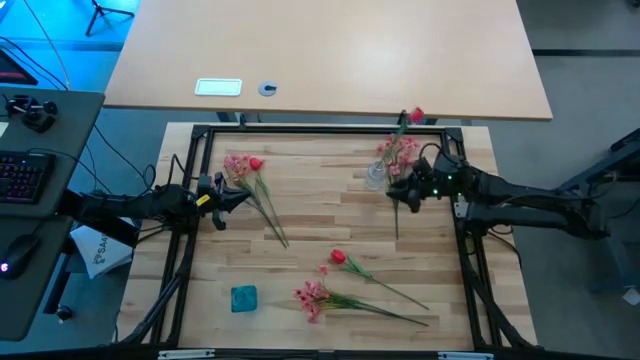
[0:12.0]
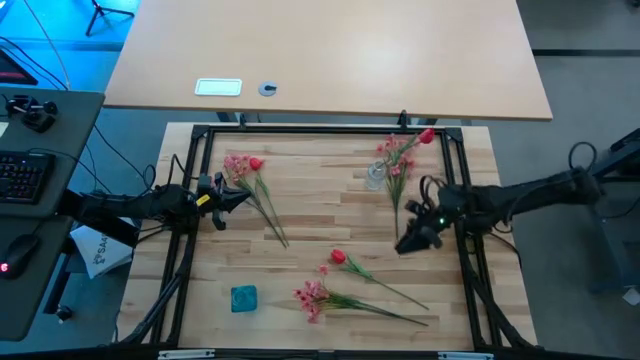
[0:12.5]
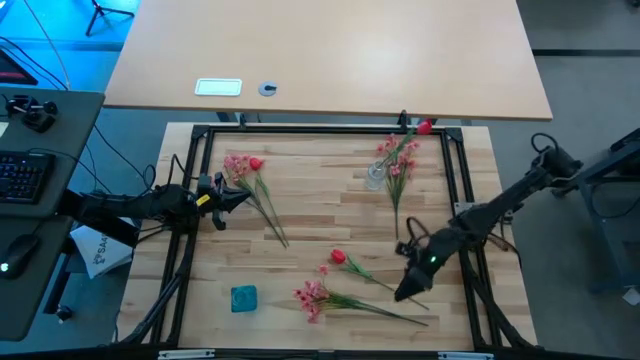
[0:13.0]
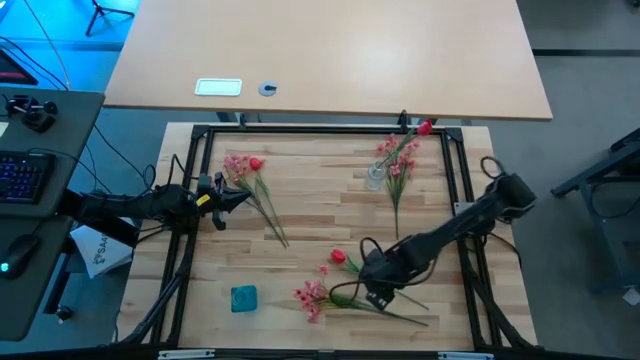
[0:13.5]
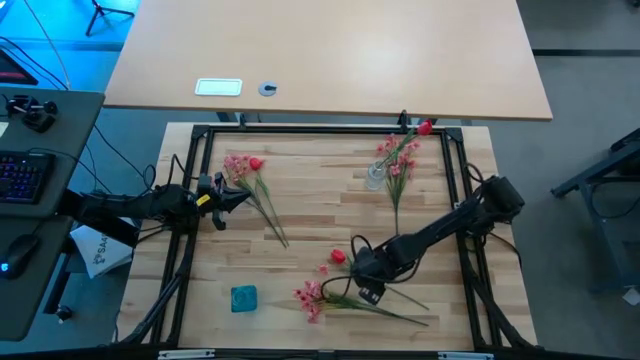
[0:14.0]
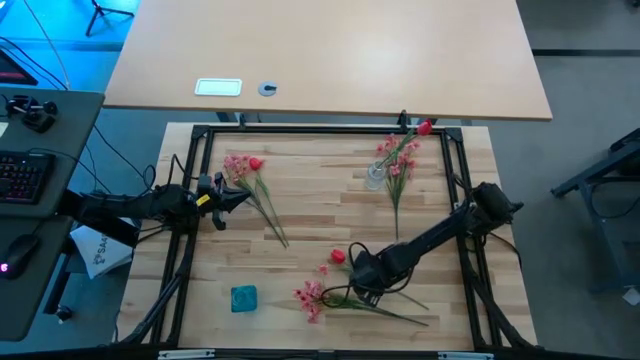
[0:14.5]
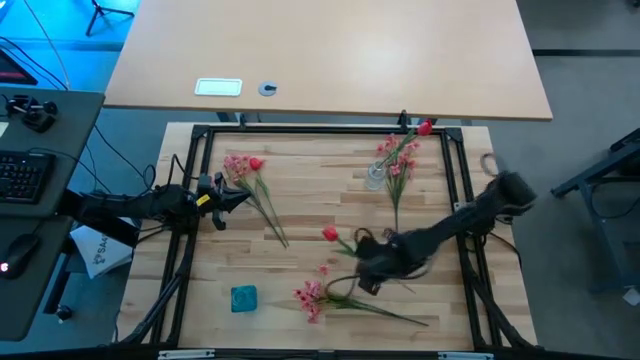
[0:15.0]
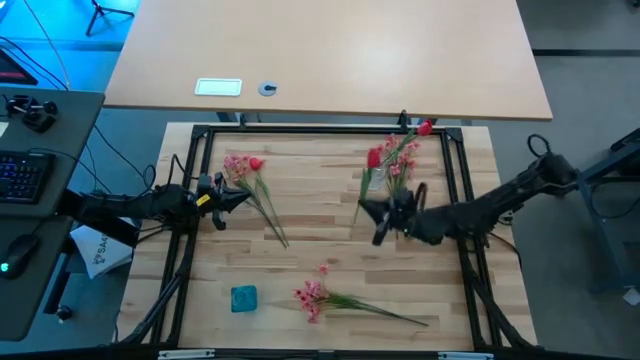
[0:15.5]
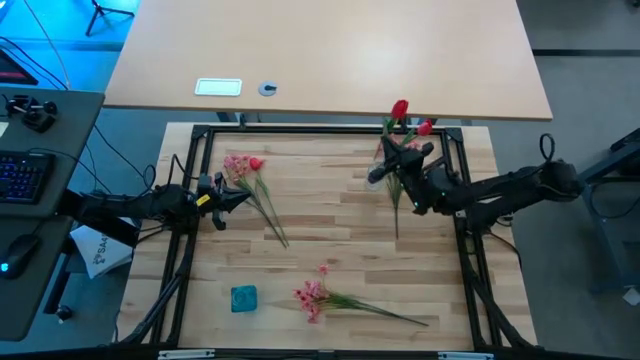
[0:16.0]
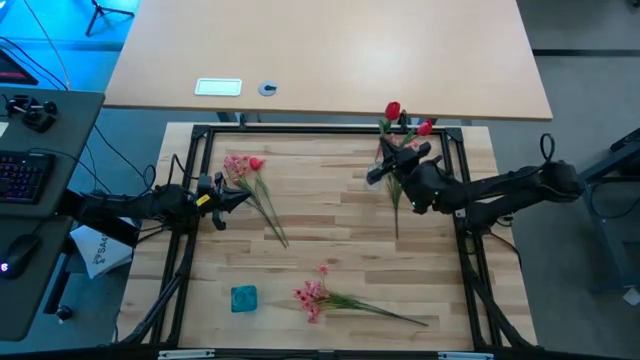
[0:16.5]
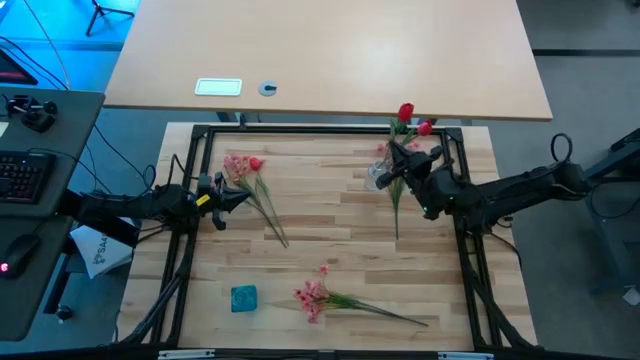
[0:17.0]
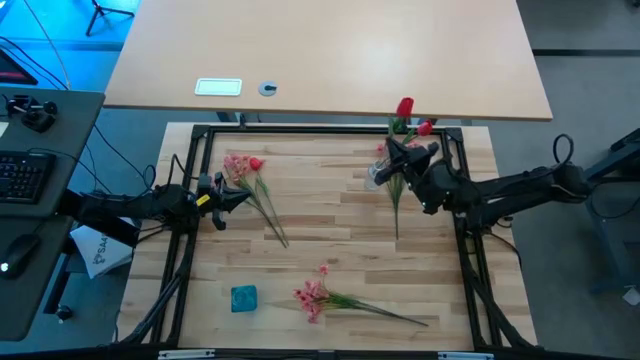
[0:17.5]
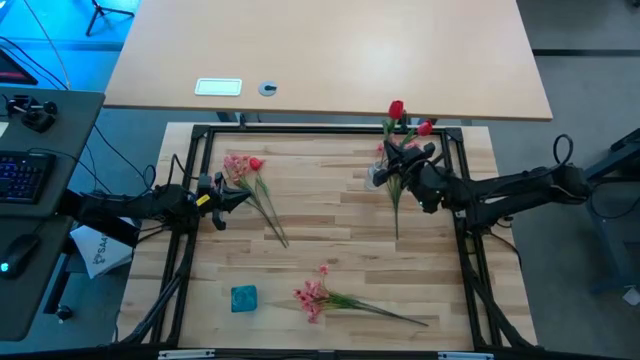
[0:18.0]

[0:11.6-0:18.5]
Task: Sort flowers into vase by color
Put the bottom red flower into the clear vase

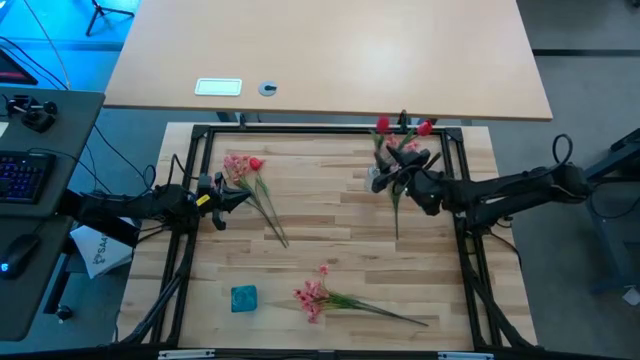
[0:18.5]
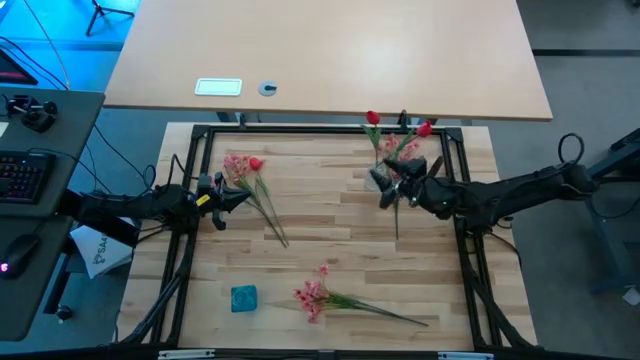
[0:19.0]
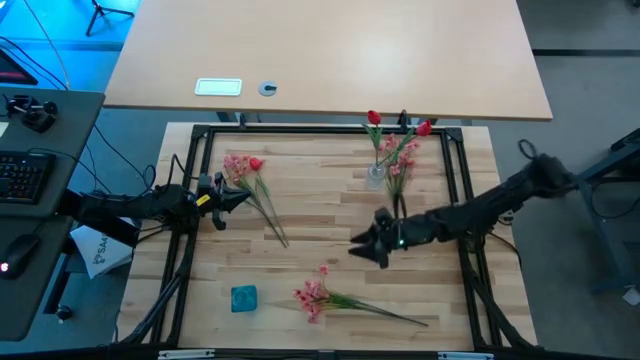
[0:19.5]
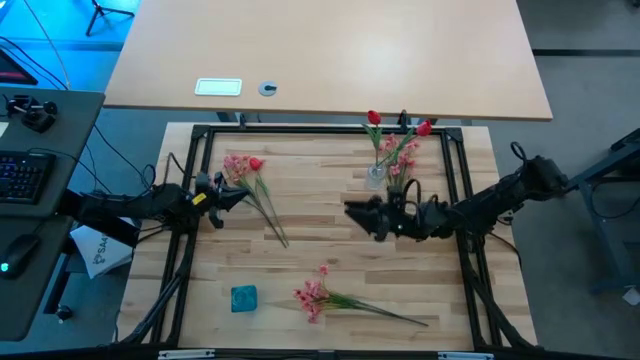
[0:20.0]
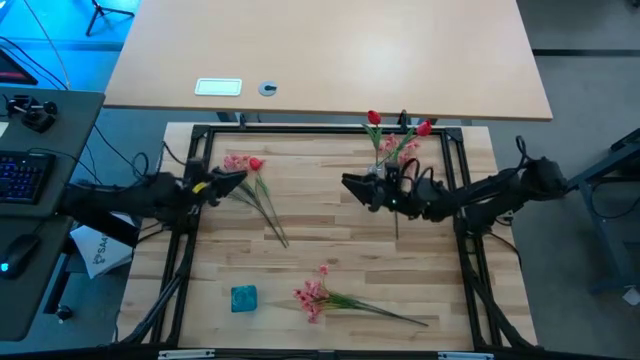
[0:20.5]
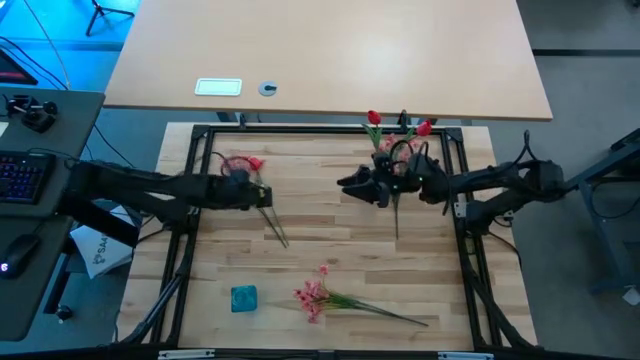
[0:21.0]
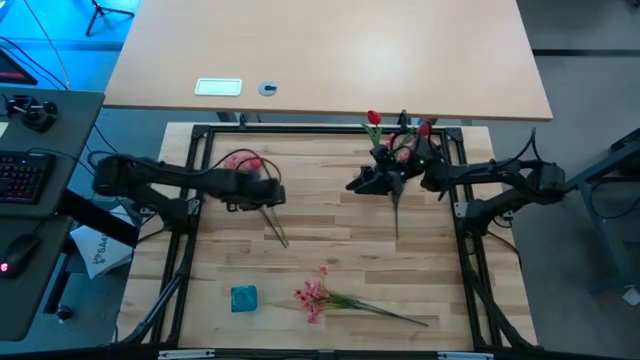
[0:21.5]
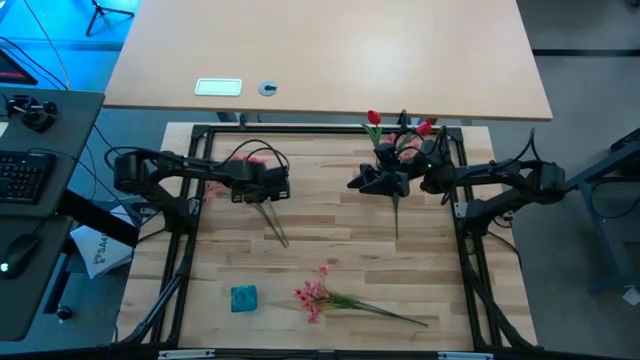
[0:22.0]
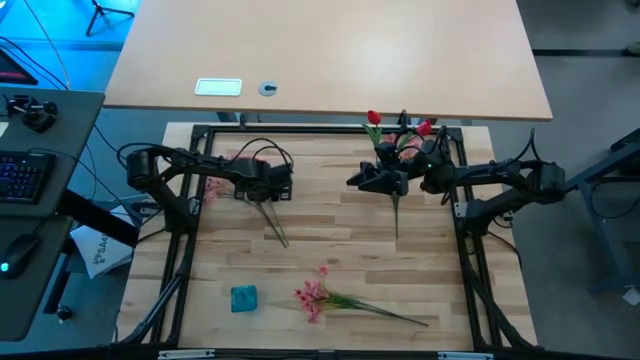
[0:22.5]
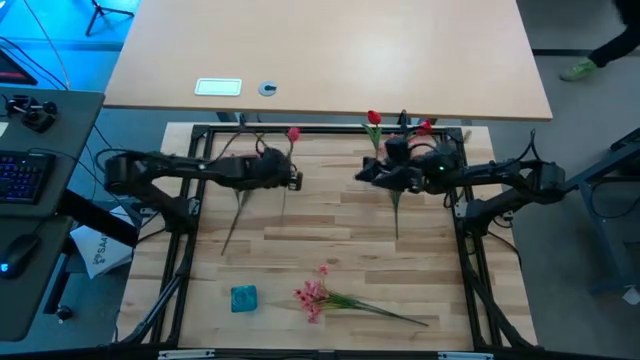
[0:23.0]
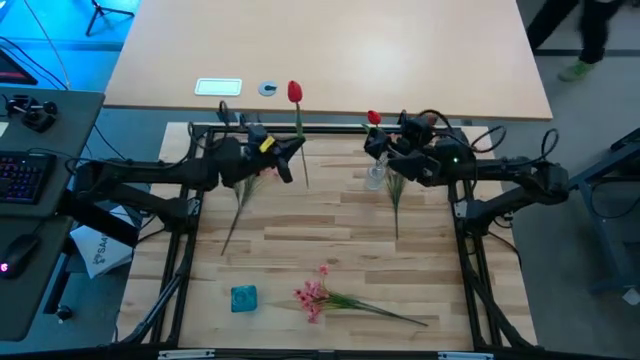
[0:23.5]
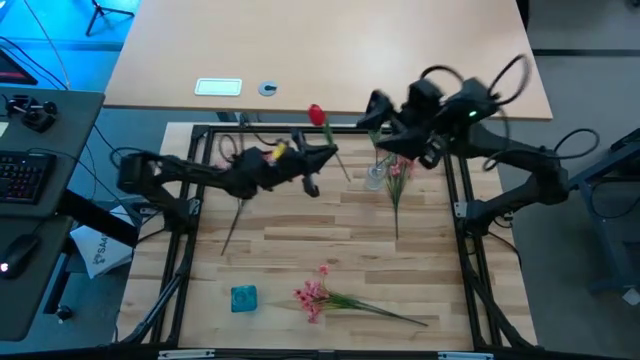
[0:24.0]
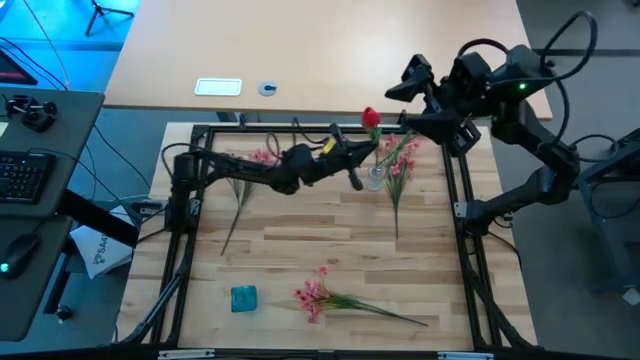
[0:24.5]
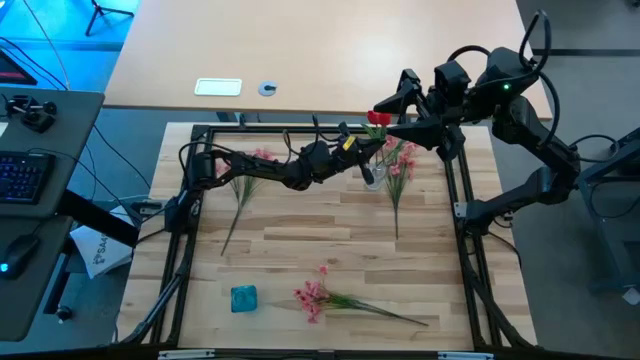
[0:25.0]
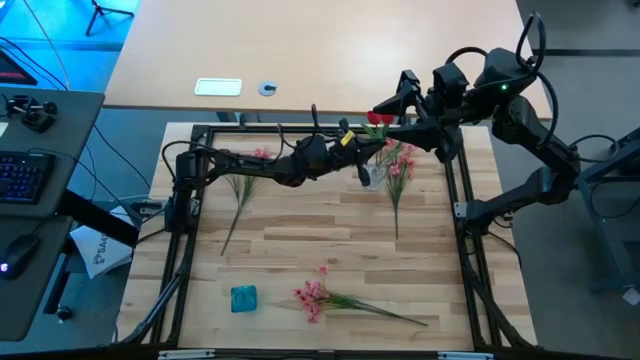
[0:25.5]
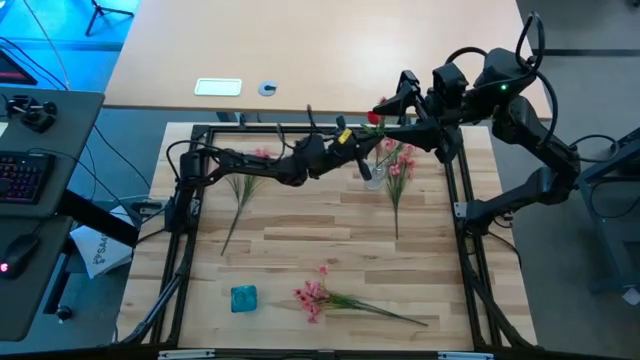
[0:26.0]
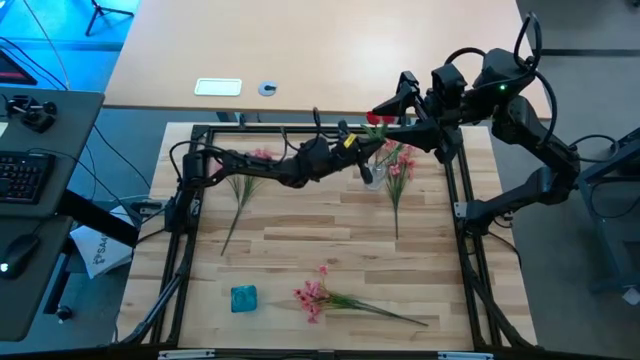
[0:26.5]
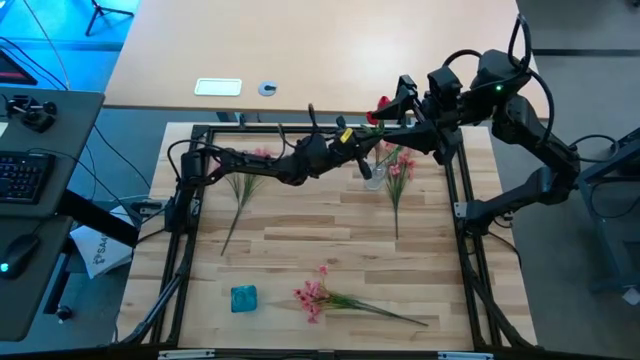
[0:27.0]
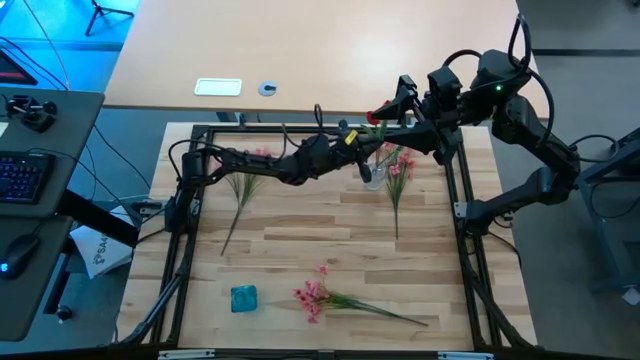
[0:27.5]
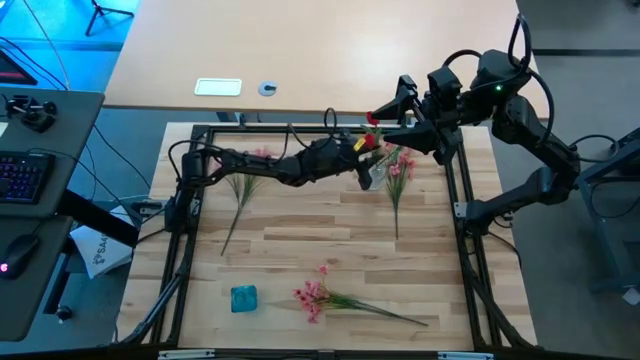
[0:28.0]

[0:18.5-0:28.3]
Put the red flower into the clear vase

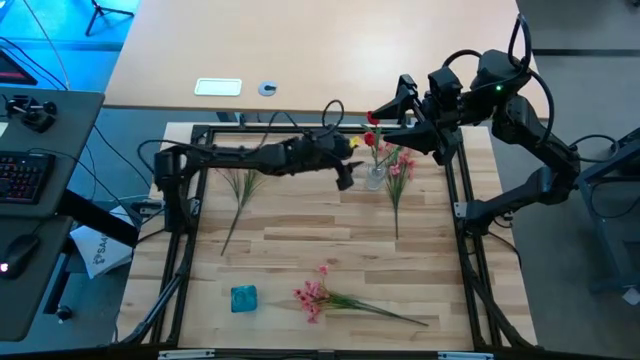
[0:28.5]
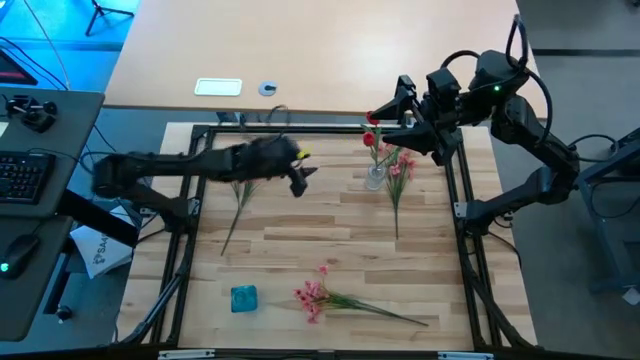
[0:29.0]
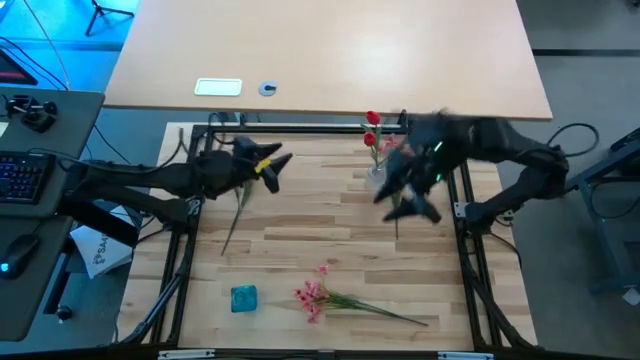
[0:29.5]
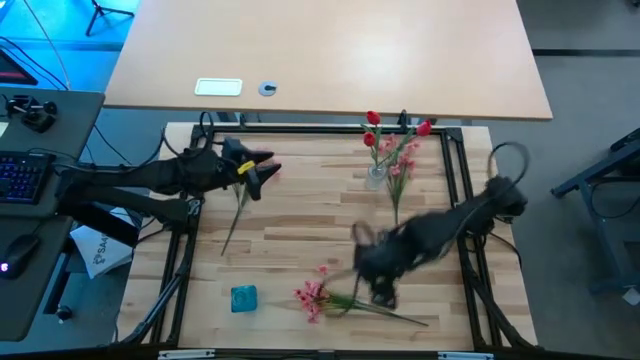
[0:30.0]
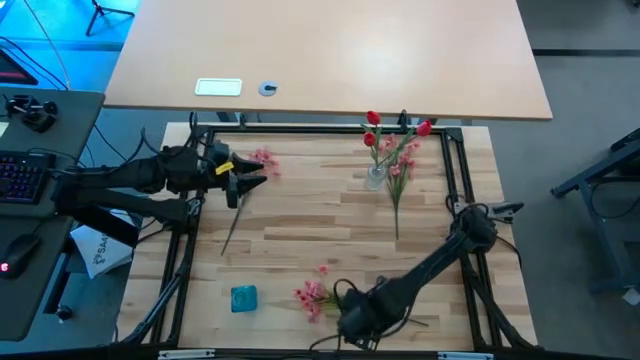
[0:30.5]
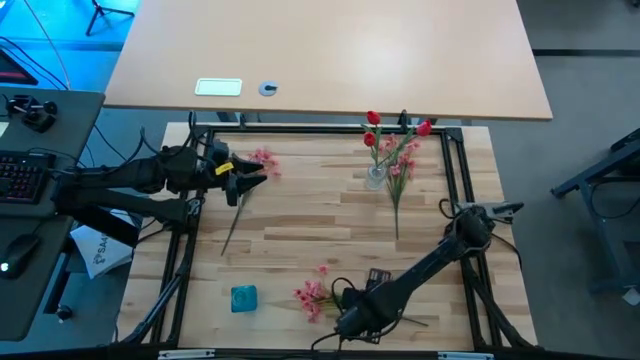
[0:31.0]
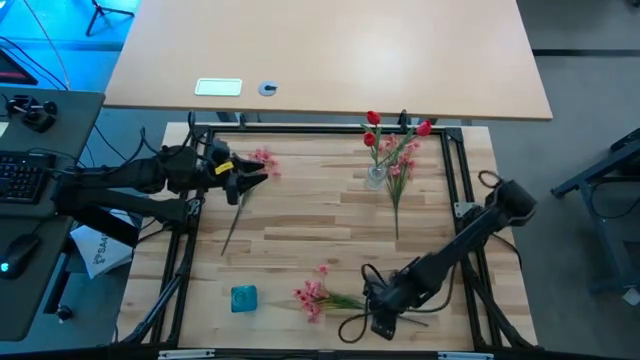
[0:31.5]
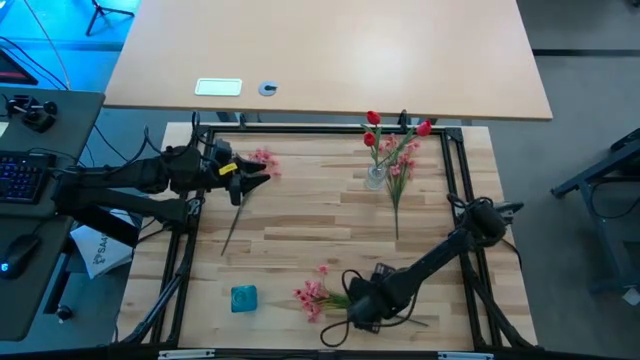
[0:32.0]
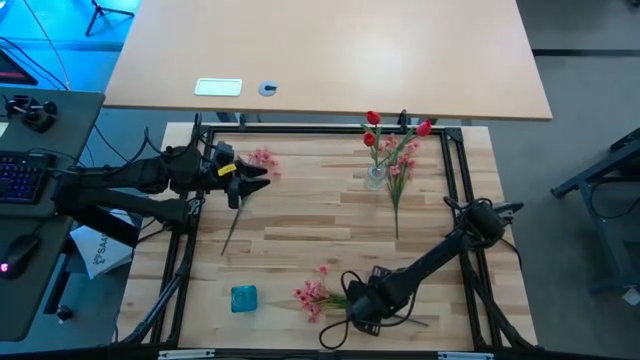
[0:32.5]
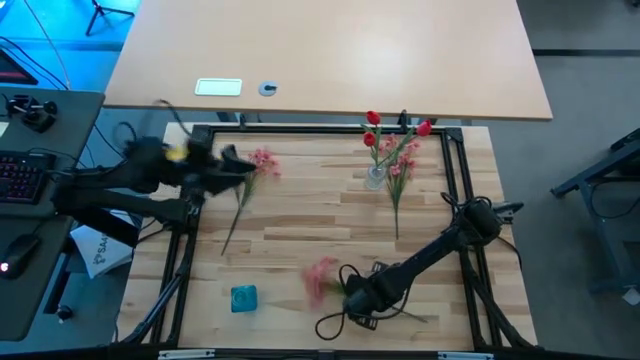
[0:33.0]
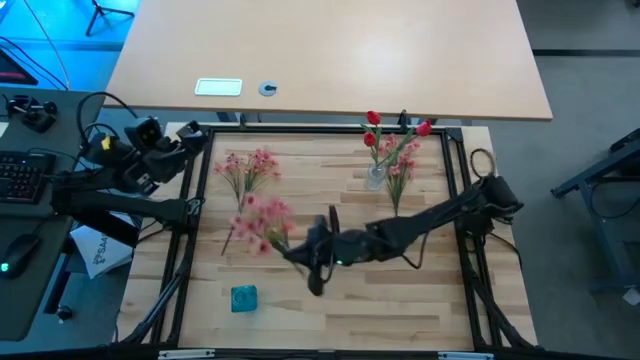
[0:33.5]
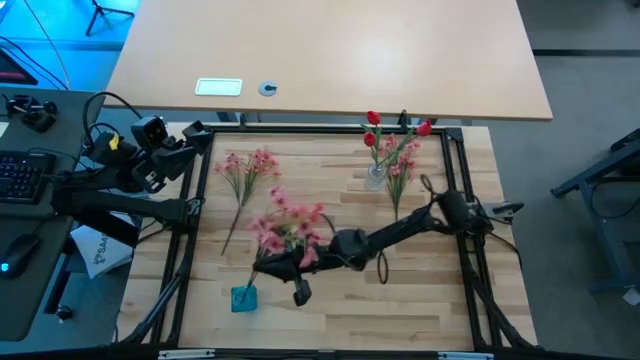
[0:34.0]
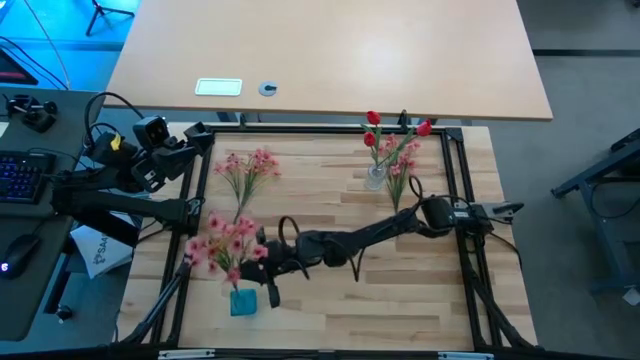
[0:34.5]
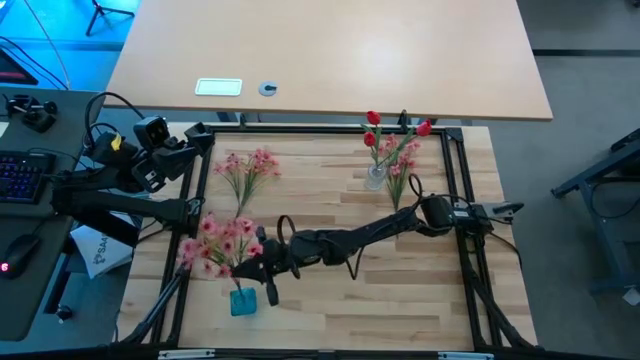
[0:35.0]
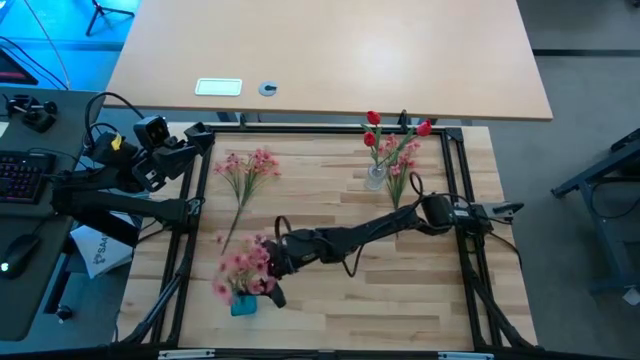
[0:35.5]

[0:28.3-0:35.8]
Put the bottom pink flower into the blue vase
